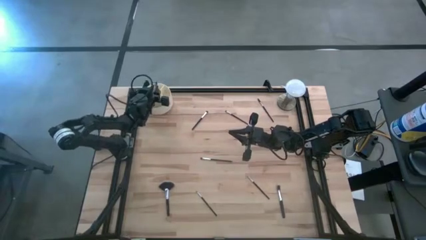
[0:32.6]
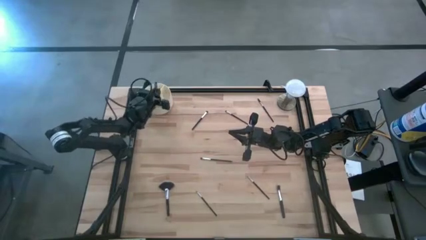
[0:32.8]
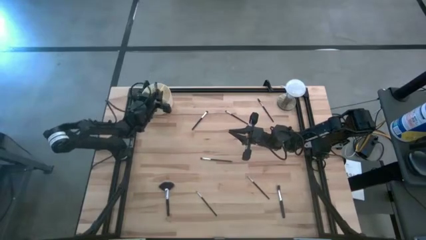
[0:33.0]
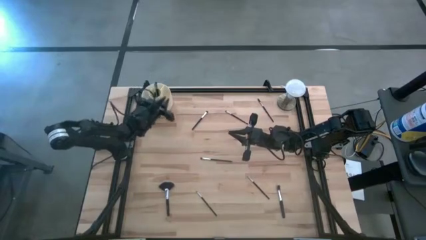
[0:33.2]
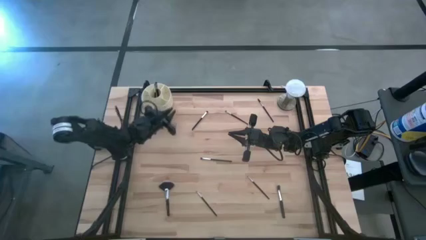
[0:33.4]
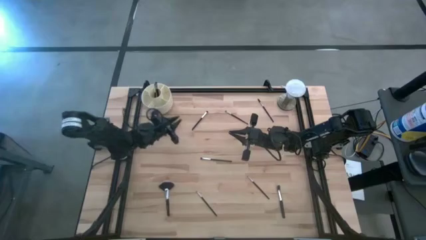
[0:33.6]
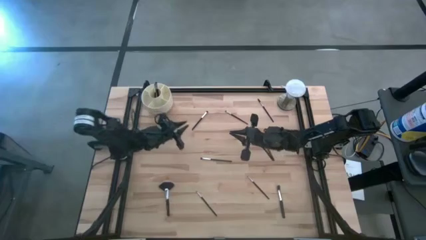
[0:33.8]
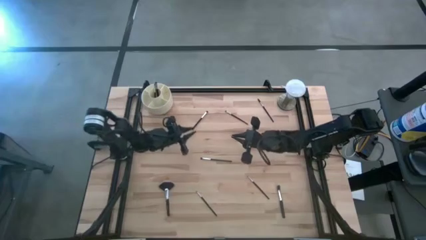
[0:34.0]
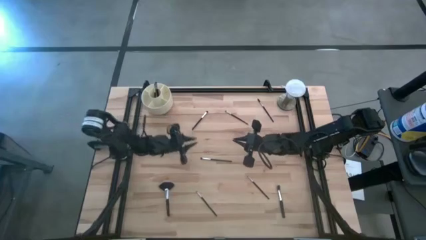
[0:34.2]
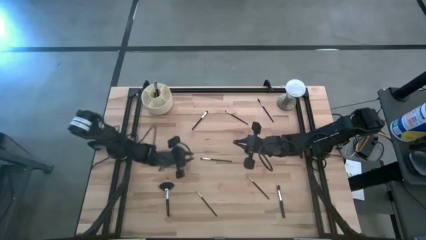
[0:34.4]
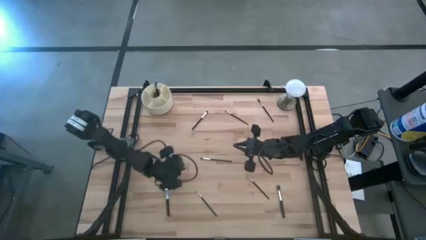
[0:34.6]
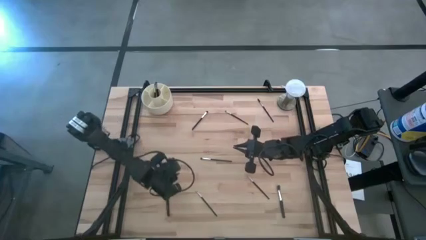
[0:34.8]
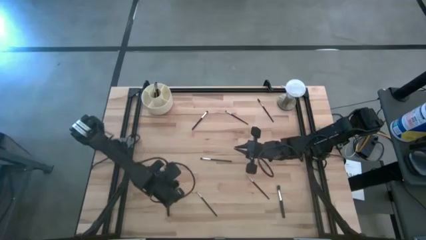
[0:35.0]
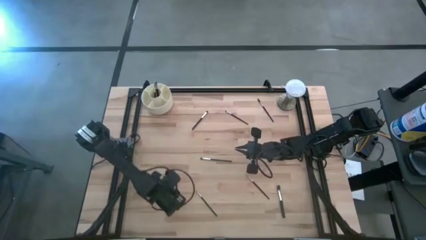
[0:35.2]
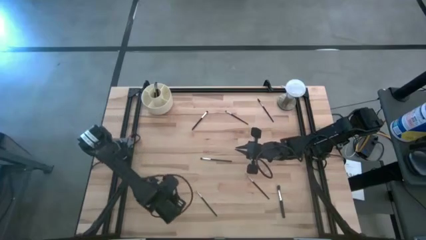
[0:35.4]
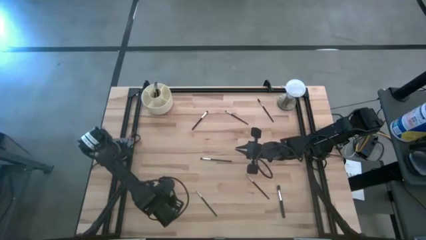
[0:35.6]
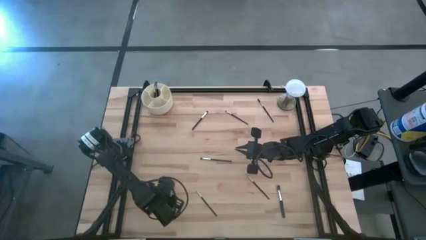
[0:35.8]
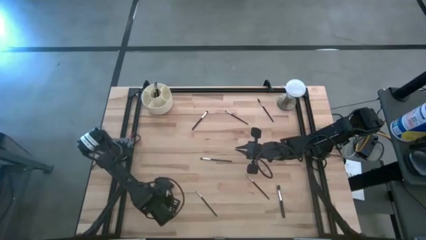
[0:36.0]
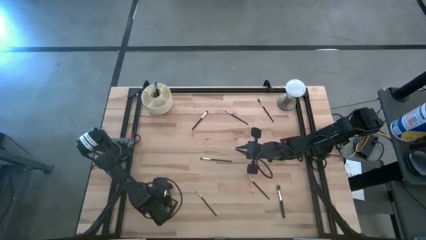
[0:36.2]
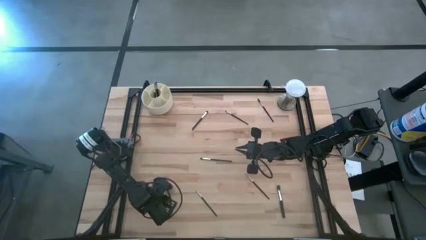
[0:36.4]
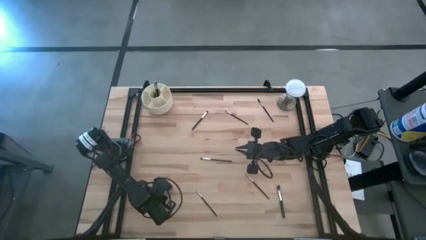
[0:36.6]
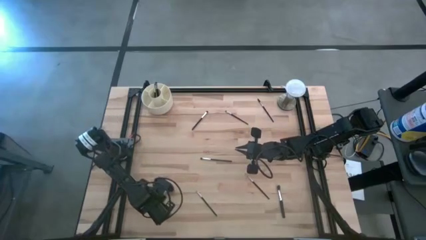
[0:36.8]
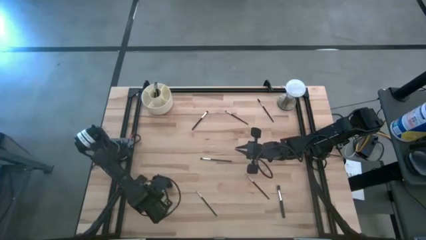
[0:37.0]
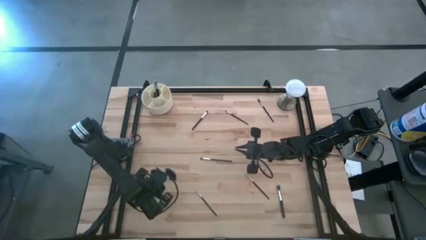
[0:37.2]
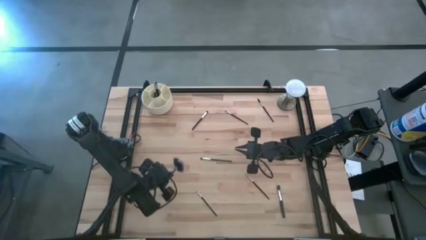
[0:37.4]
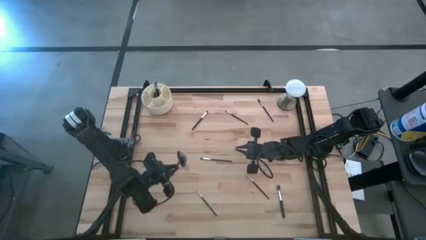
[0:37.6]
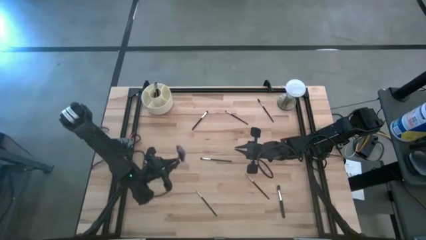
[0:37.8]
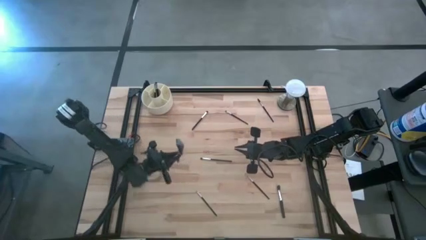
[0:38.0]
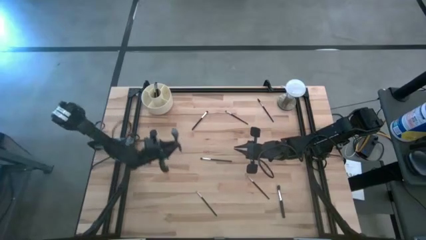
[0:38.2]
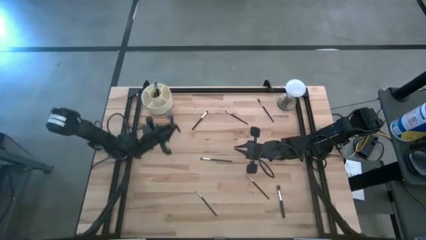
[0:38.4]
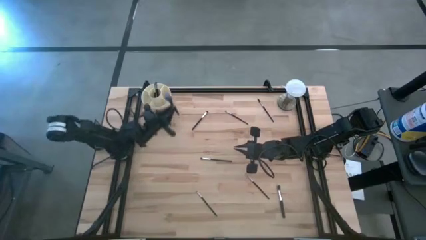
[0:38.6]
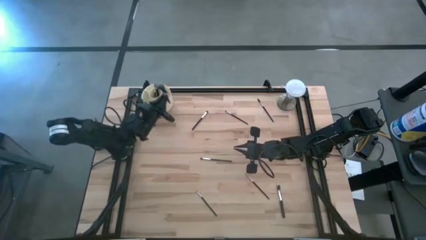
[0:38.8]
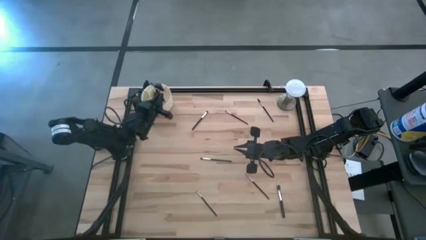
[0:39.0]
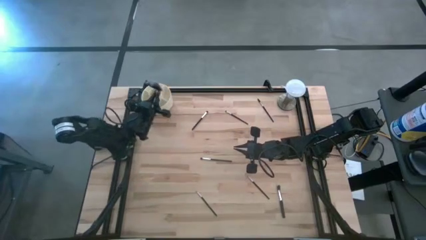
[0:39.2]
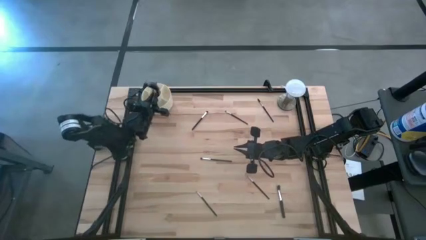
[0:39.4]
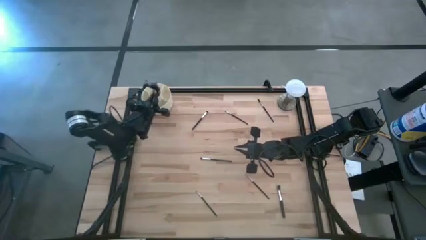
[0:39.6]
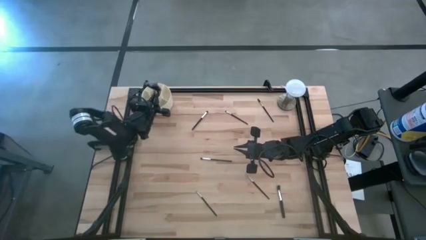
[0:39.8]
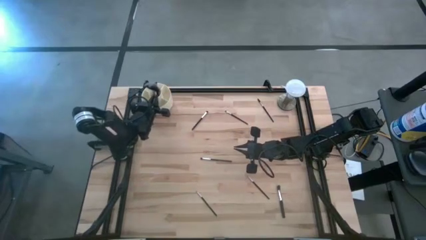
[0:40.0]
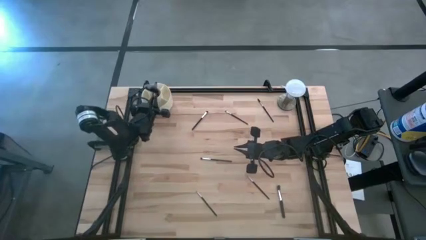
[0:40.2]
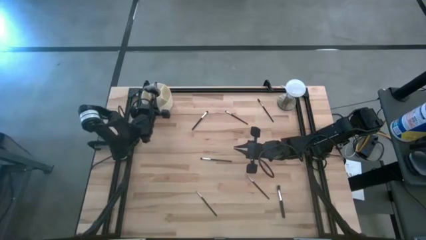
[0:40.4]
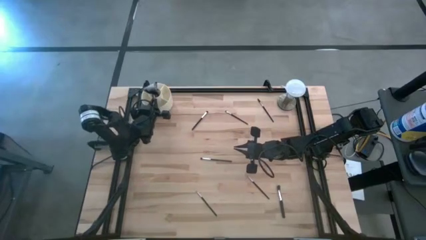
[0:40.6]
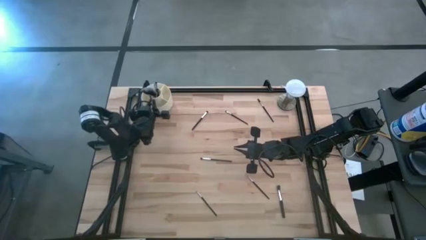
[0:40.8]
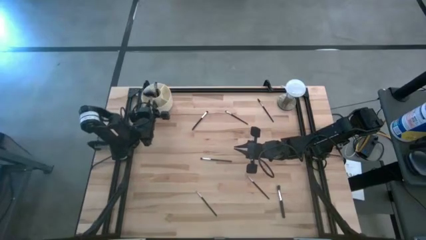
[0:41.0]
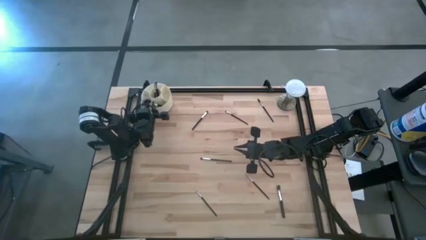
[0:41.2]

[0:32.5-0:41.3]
Task: Put items in baskets/containers
Put the highlighter brush into the organizer

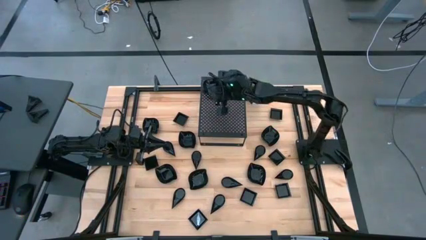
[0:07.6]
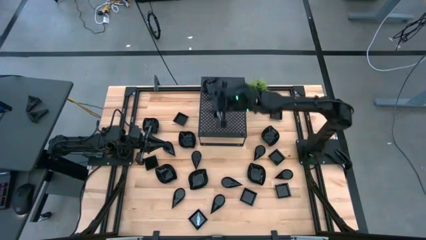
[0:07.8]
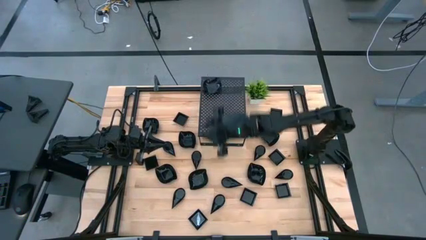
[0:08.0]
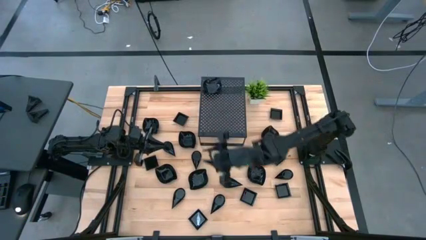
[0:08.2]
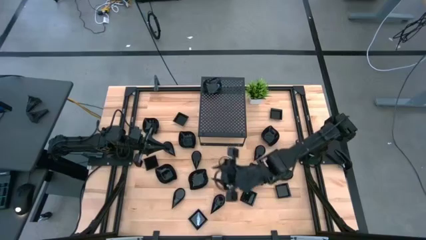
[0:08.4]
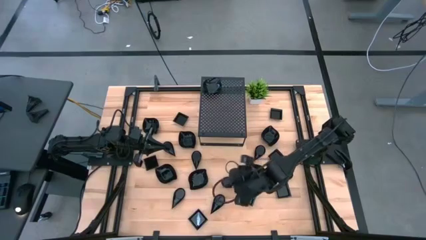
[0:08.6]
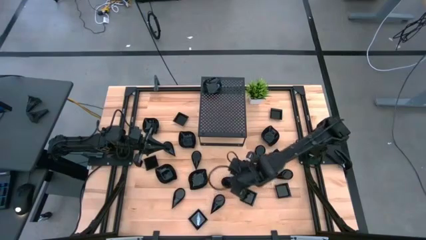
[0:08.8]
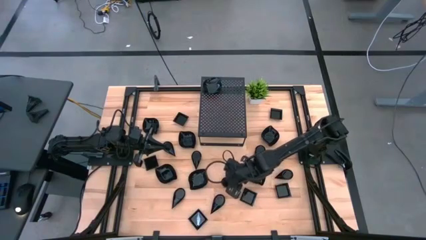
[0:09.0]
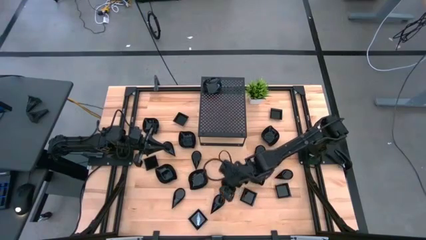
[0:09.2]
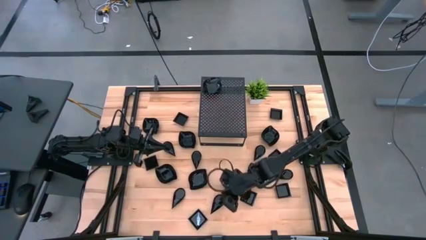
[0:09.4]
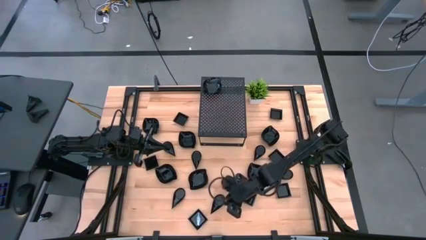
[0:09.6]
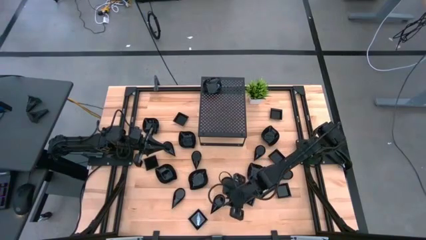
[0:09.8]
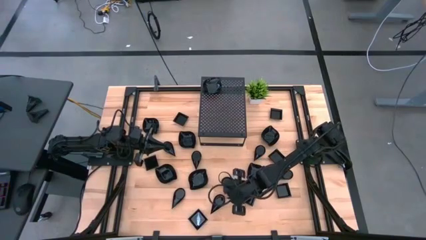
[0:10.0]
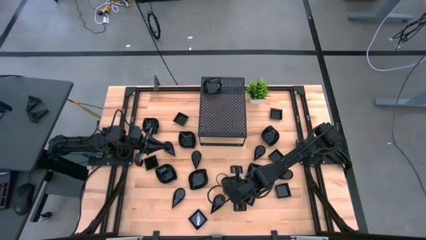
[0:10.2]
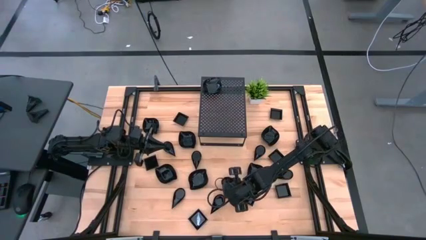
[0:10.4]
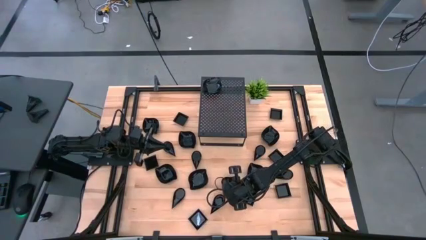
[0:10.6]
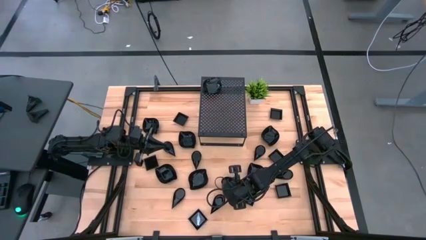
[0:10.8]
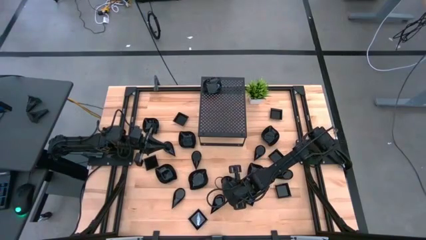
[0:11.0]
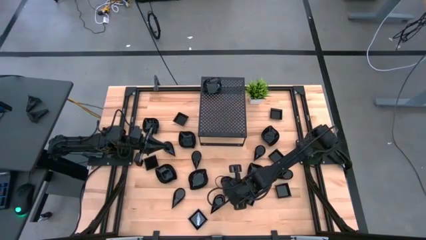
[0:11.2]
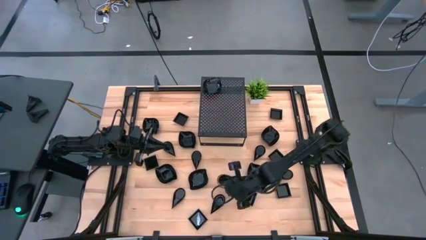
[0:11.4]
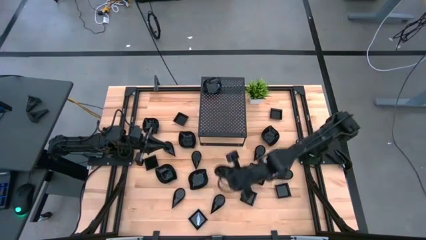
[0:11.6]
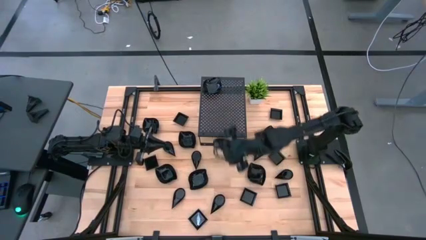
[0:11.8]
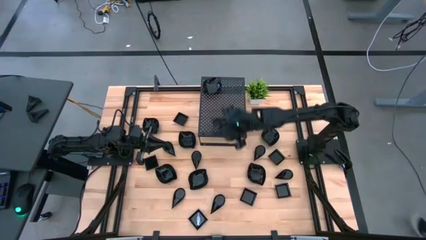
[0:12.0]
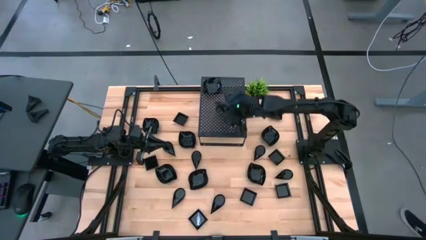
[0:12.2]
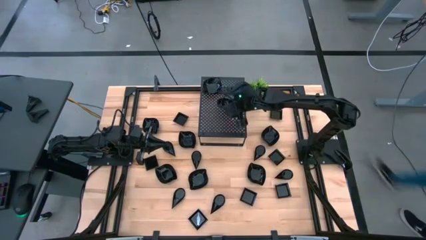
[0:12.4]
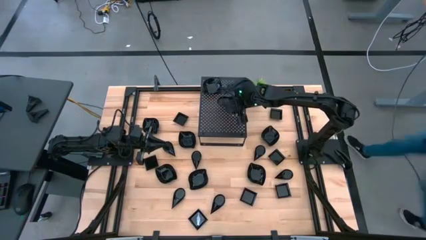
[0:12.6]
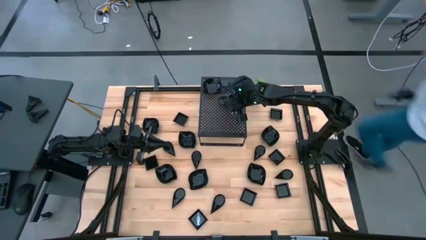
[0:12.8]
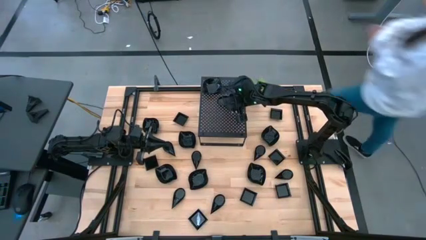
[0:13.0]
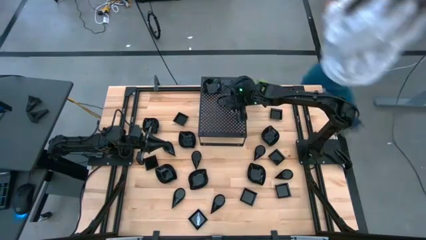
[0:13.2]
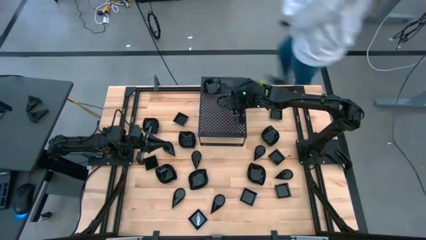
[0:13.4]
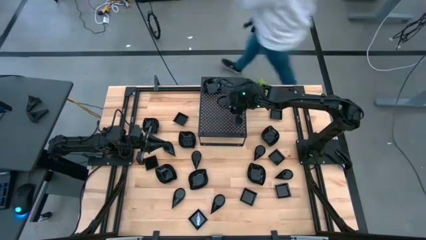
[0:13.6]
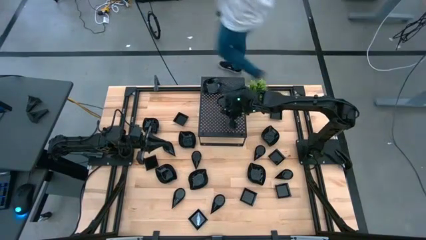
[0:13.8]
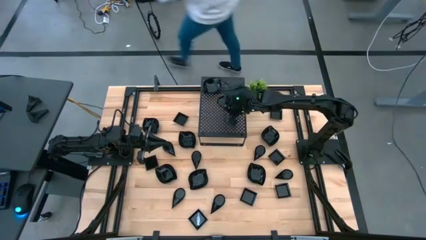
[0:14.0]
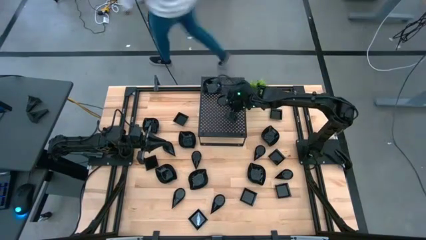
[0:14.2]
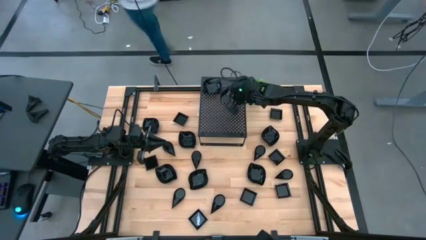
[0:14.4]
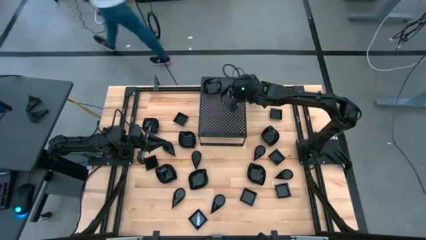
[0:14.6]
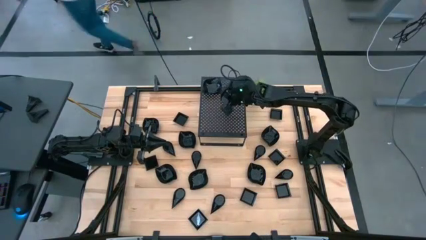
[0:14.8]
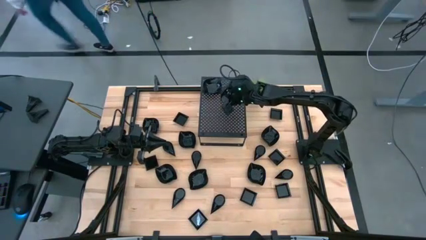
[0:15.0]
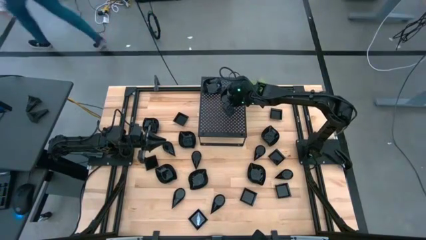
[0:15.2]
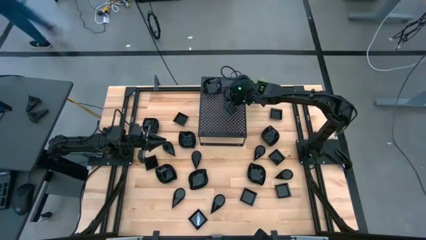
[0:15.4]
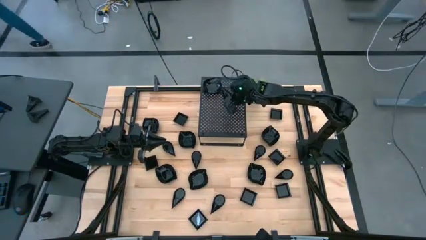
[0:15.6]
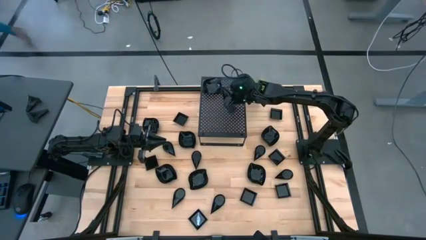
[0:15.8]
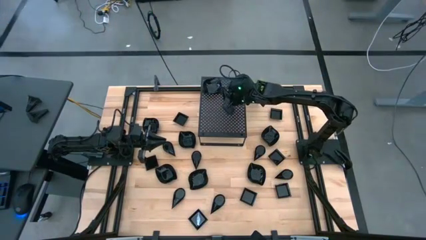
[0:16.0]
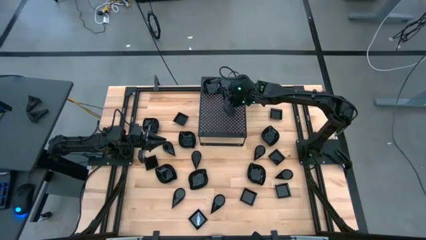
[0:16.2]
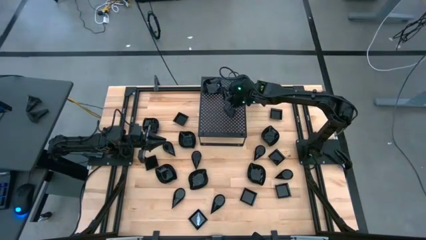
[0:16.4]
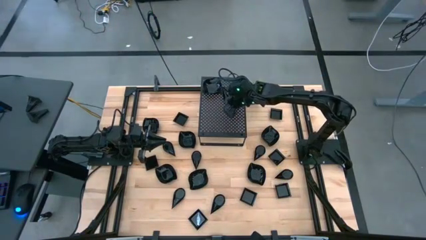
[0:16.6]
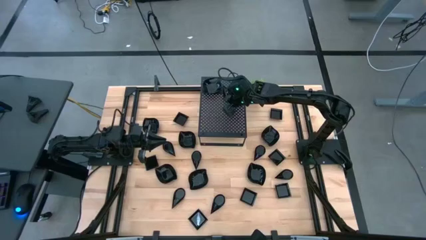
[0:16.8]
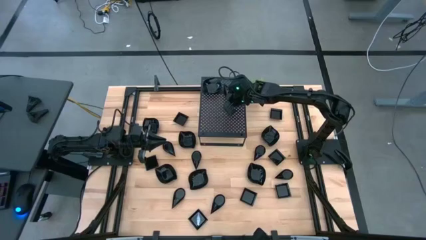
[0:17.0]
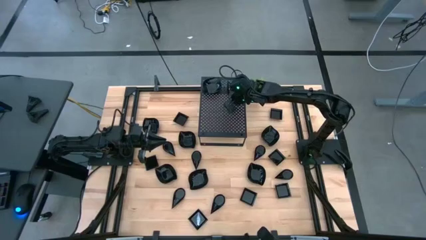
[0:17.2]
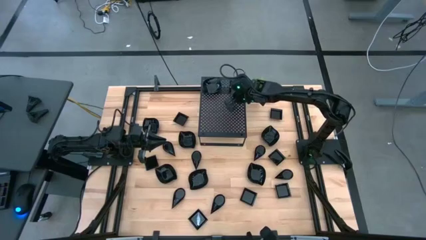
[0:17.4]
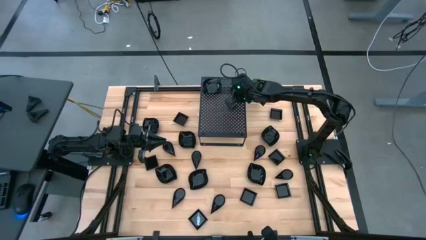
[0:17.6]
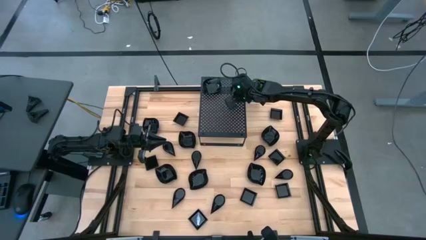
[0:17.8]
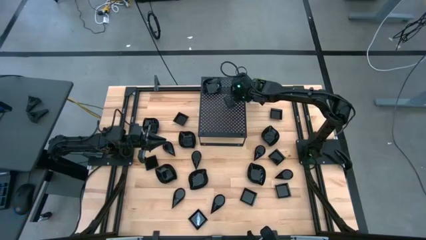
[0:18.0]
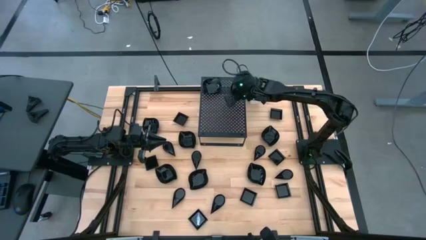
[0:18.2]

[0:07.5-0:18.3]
Task: Pick & Place Mini shaped plates
Put the black drop-shaped plate on the shelf
